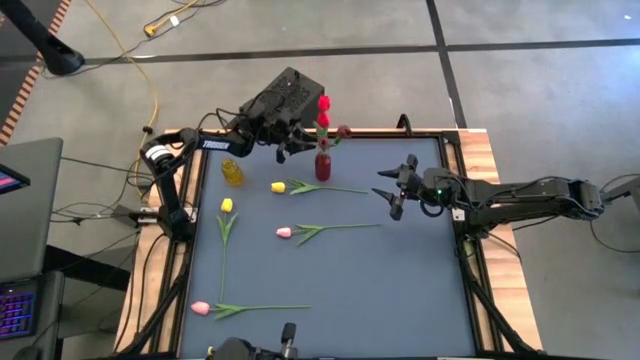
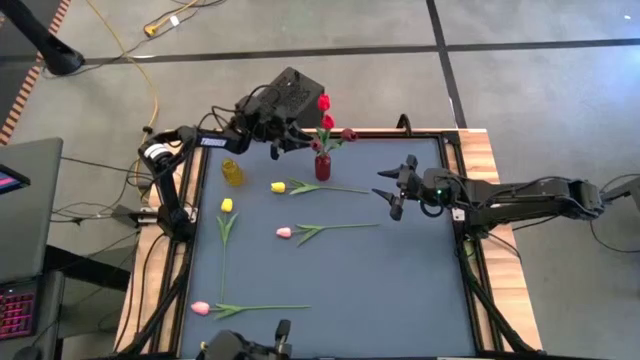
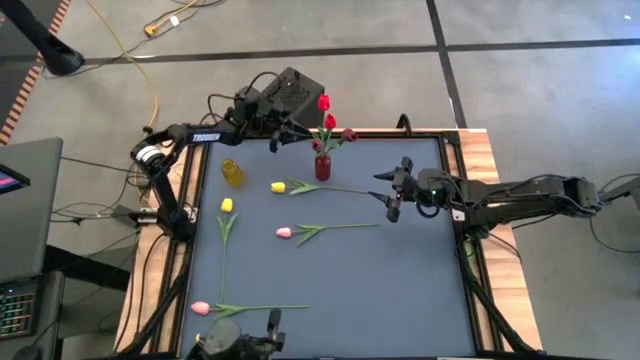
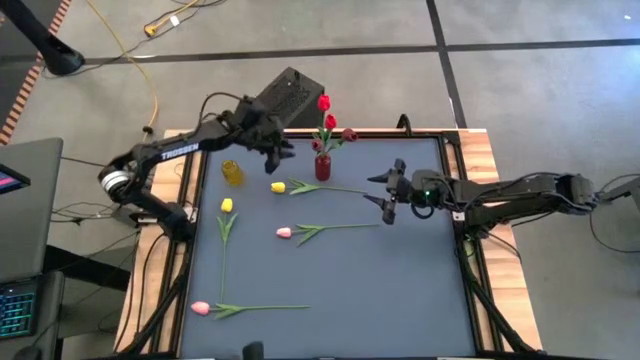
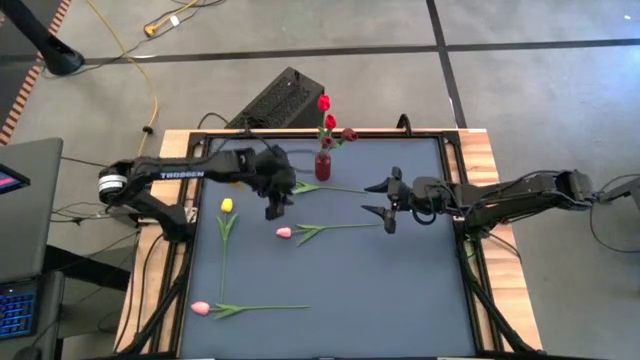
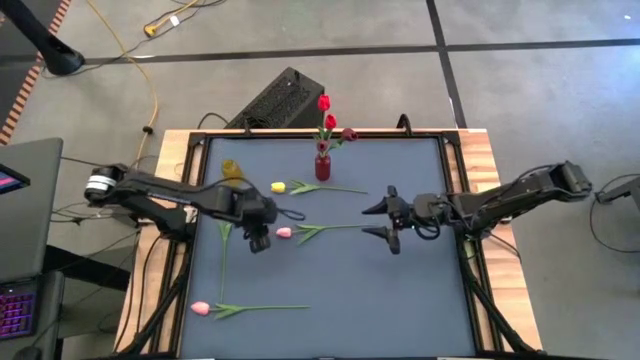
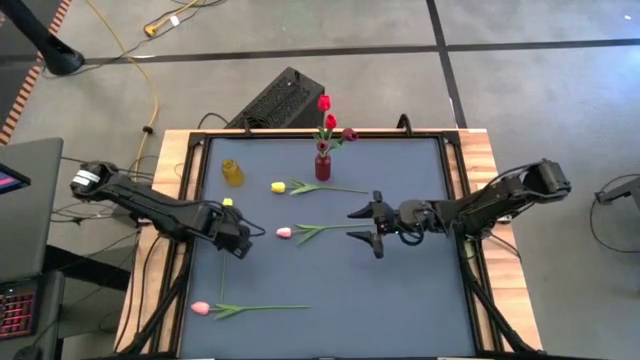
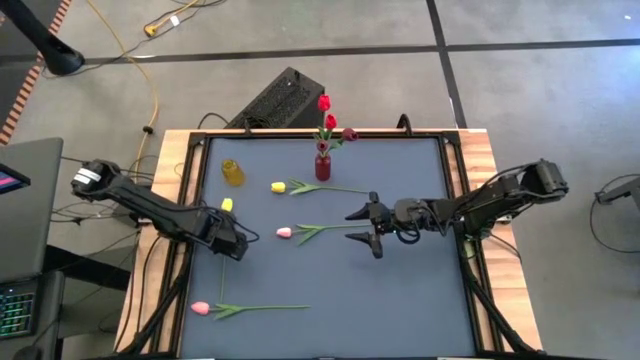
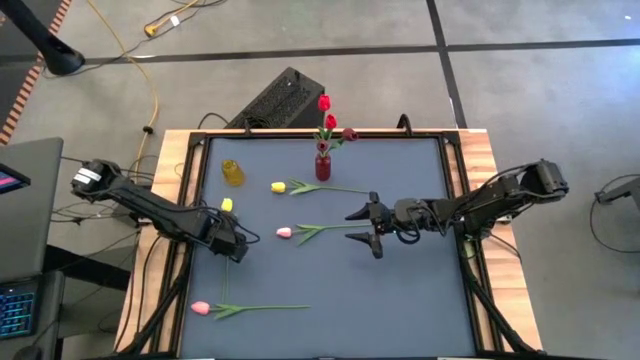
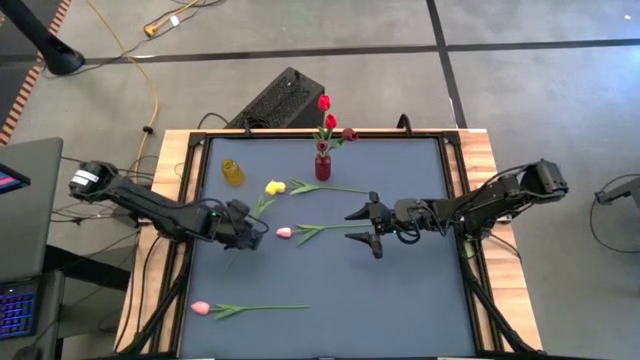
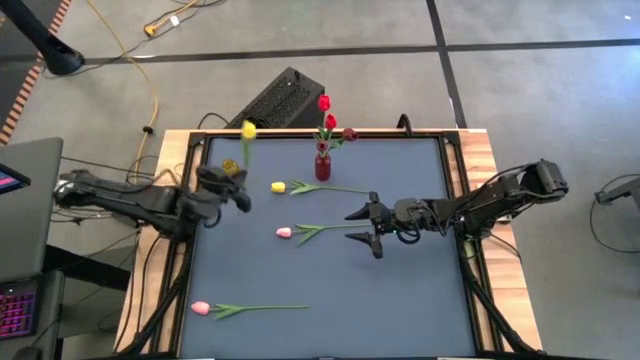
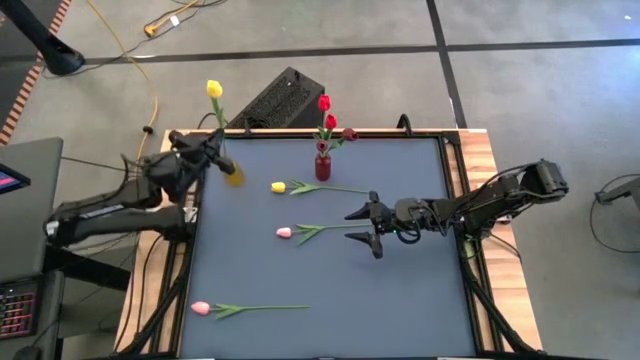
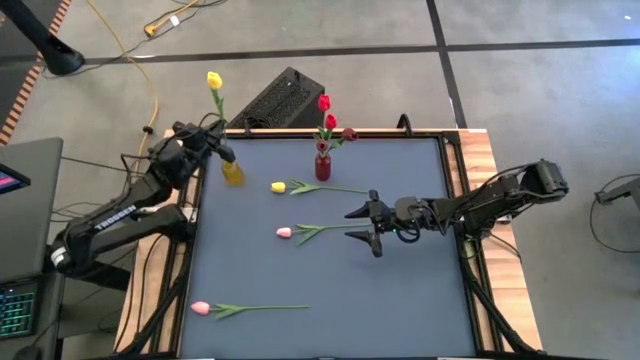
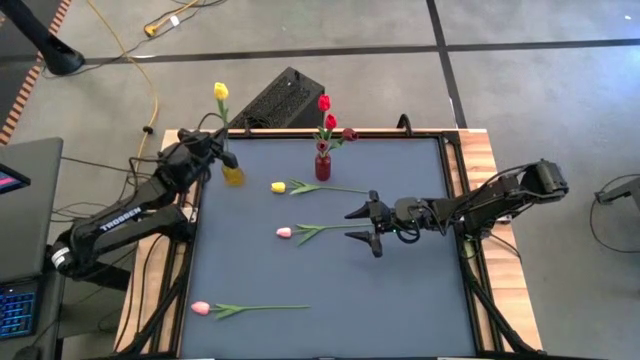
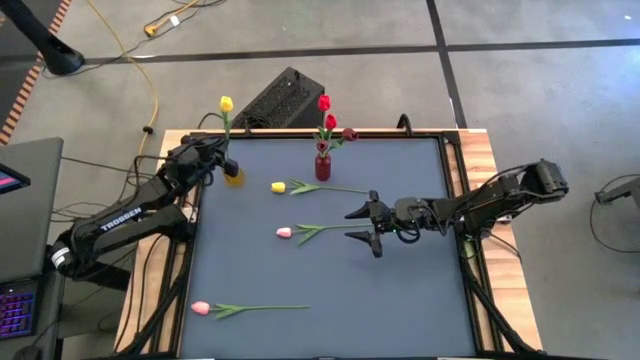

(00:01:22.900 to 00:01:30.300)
Task: Sort flowers into vase by color
Put the left yellow flower into the yellow flower vase

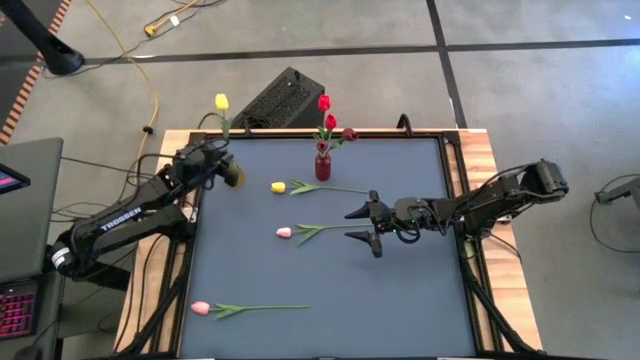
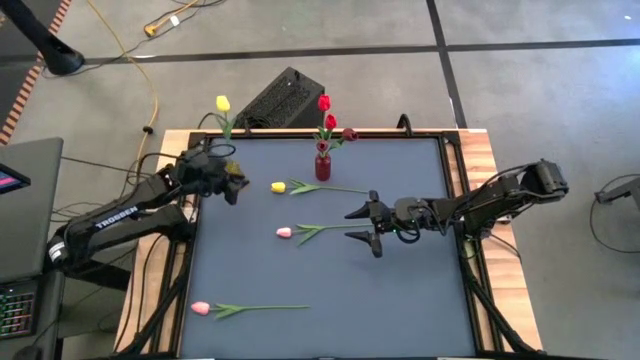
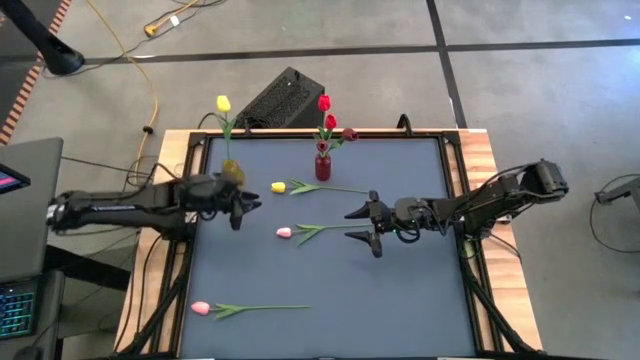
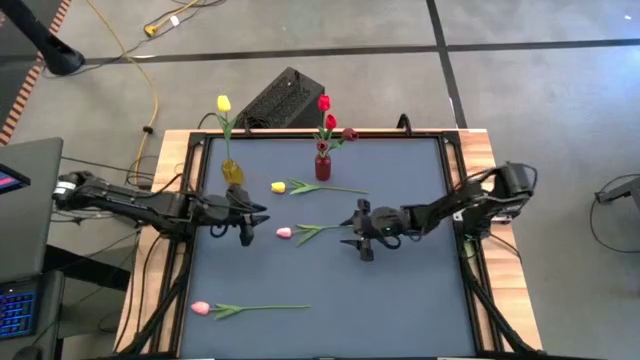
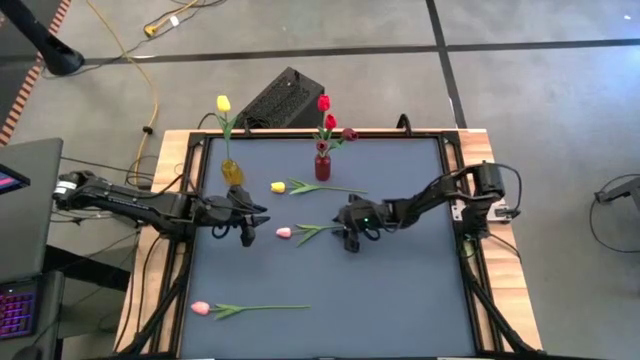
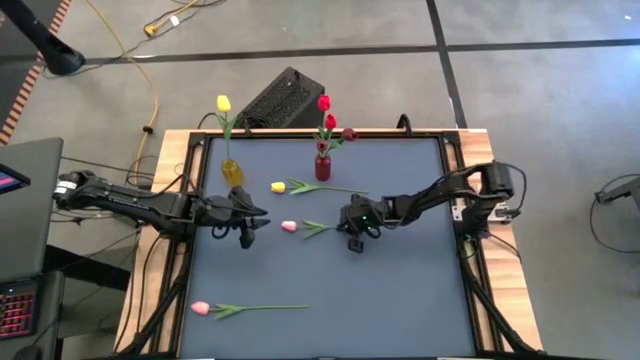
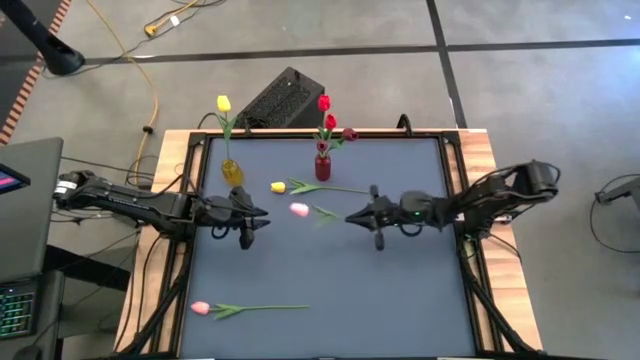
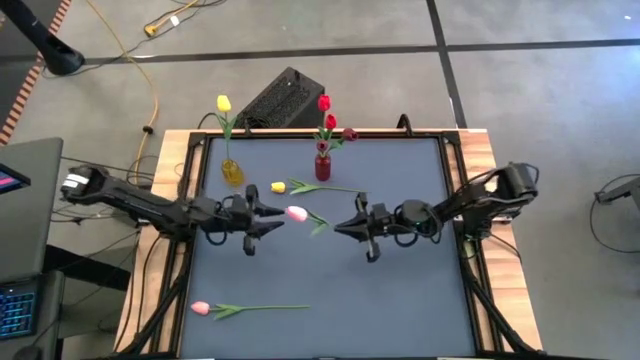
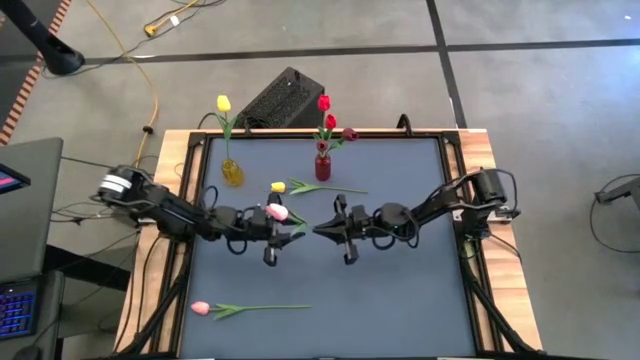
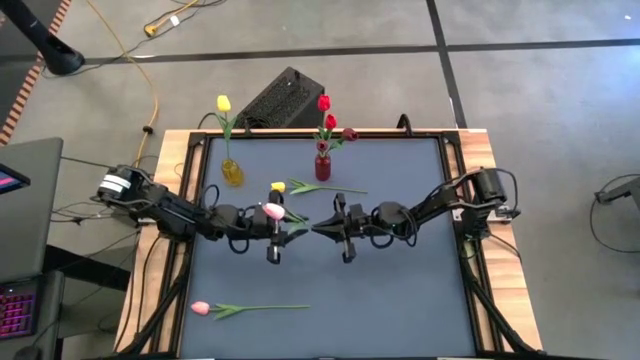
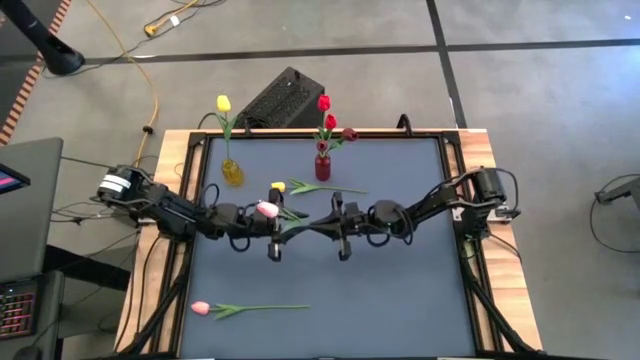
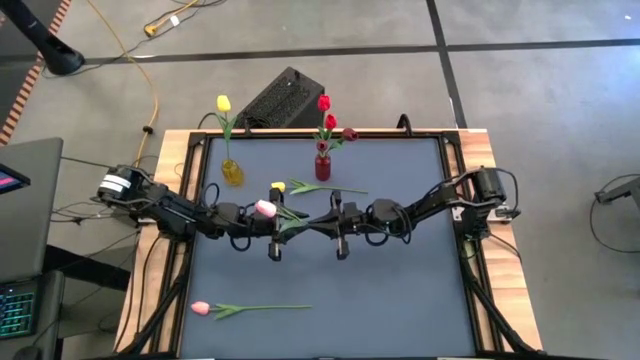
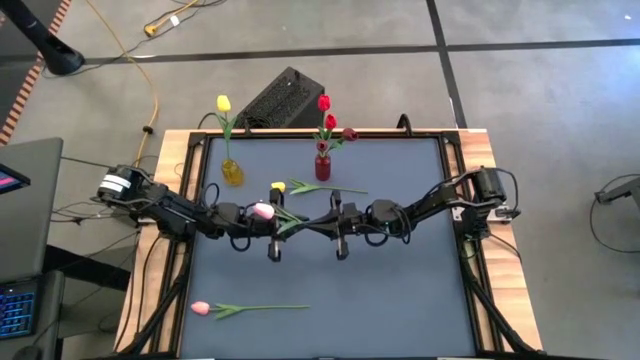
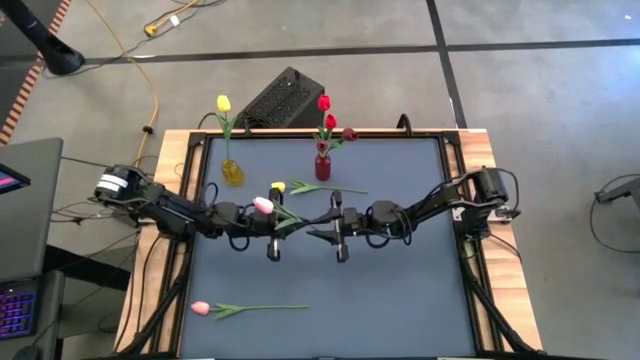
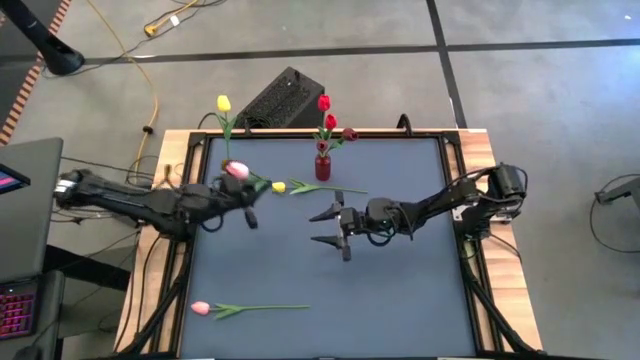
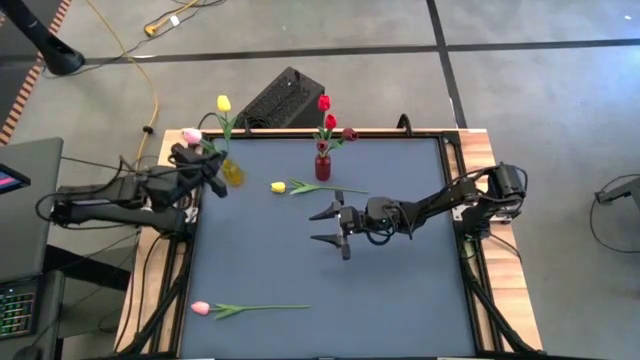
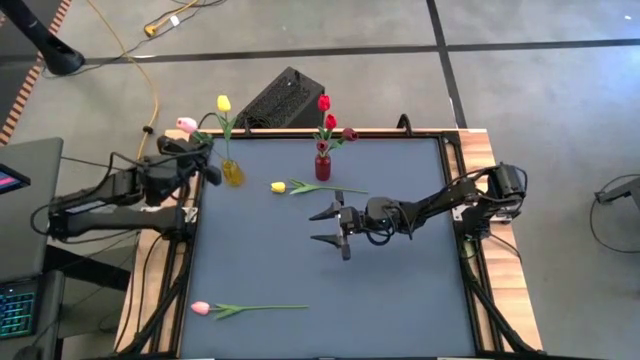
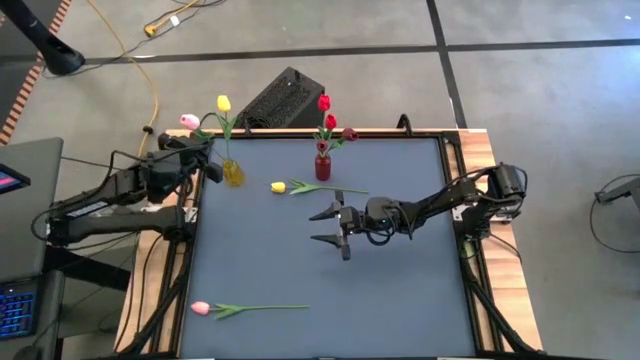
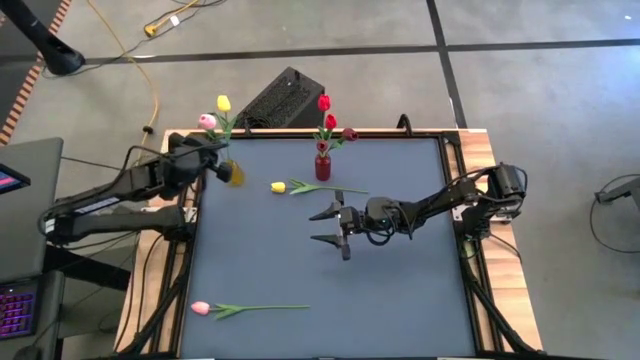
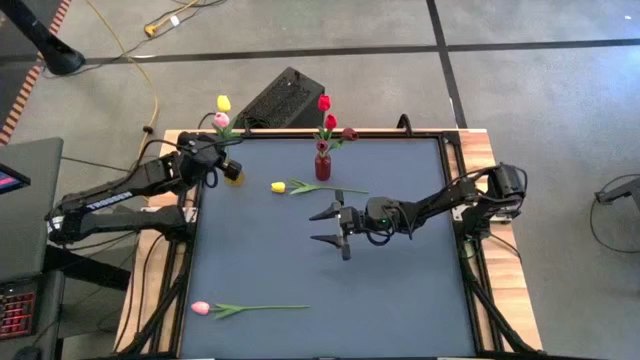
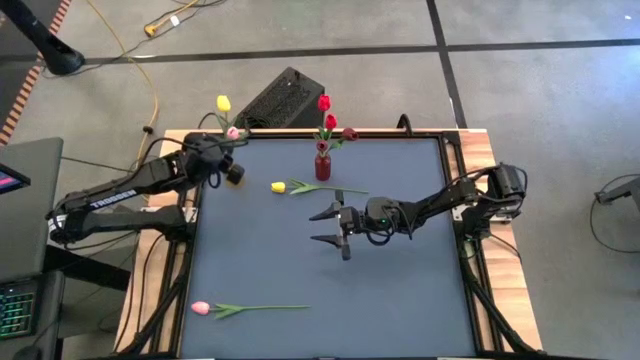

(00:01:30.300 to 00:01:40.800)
Put the top pink flower into the yellow flower vase

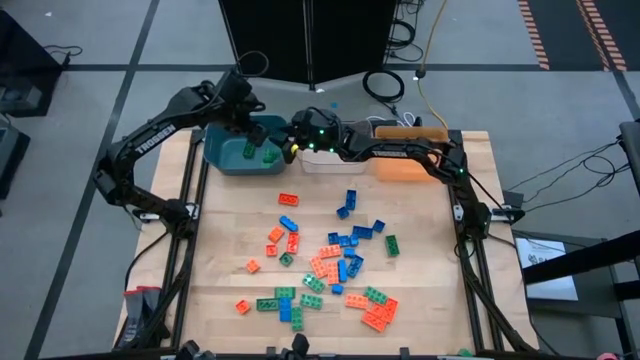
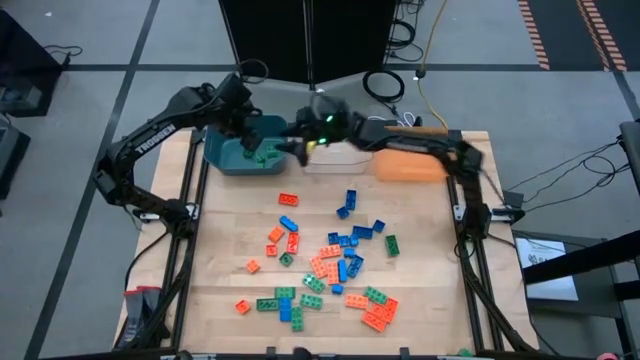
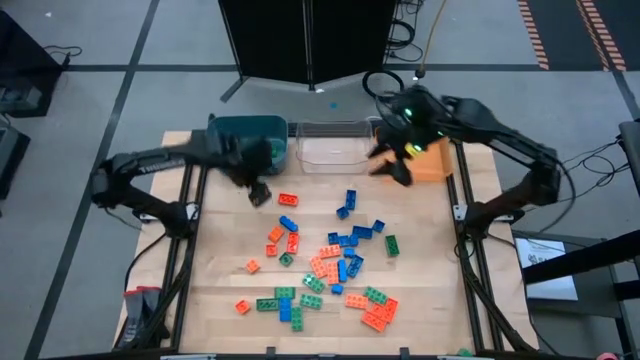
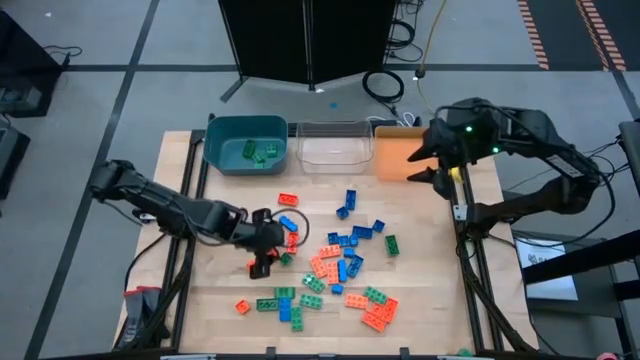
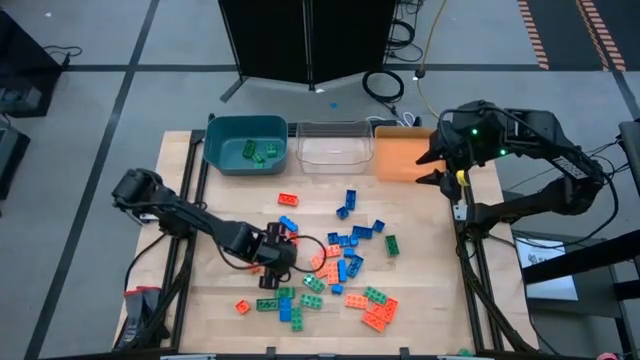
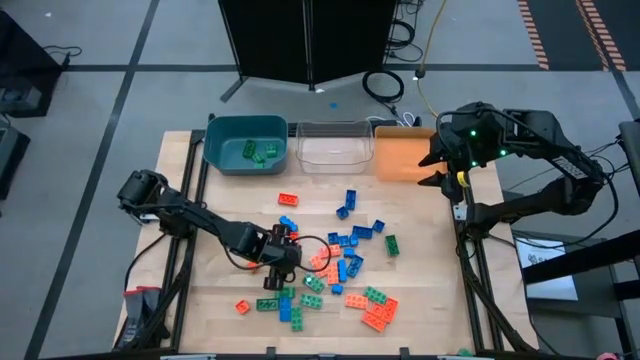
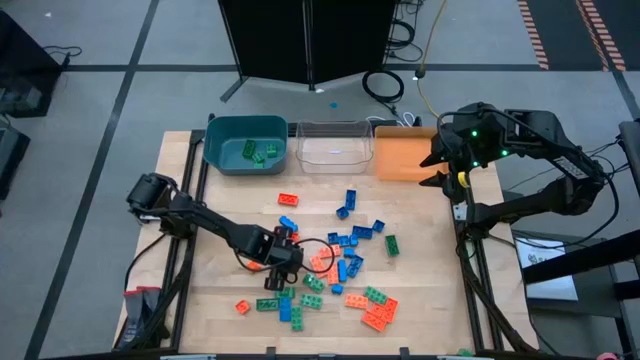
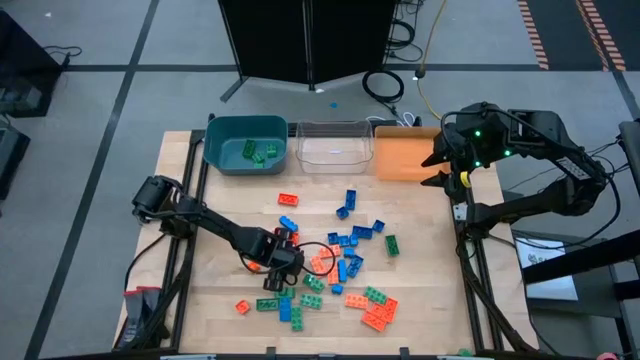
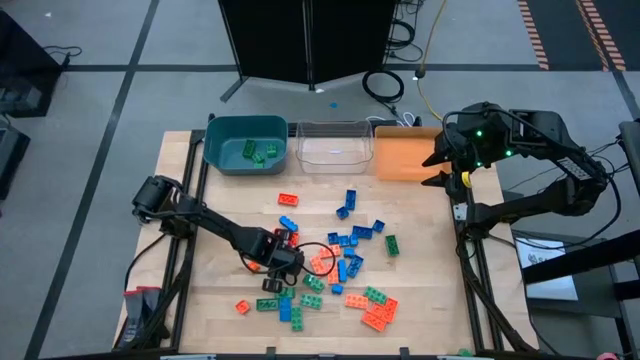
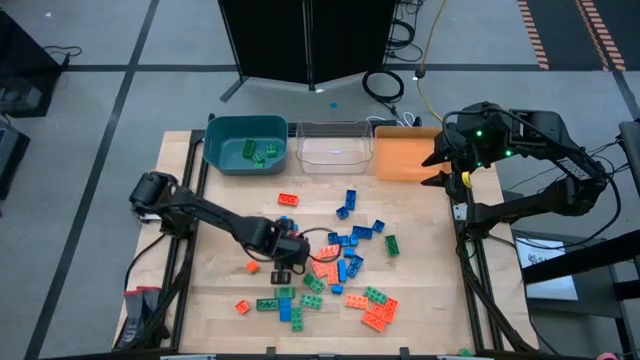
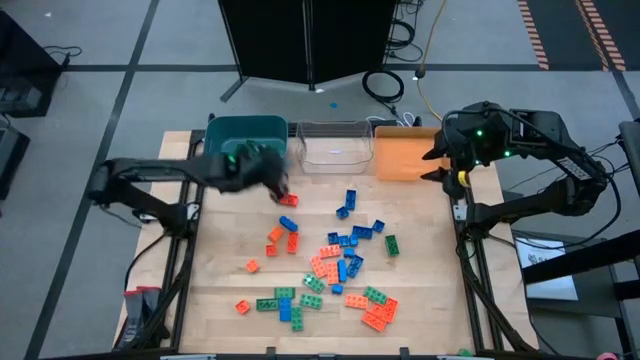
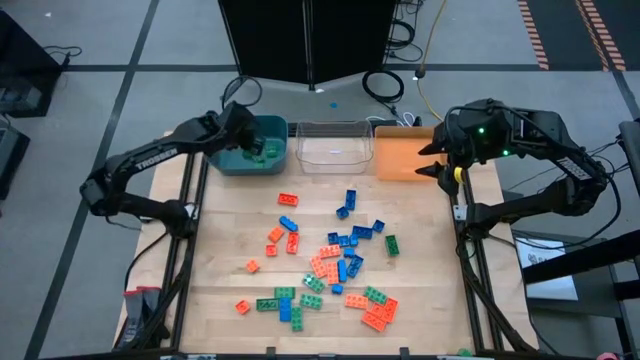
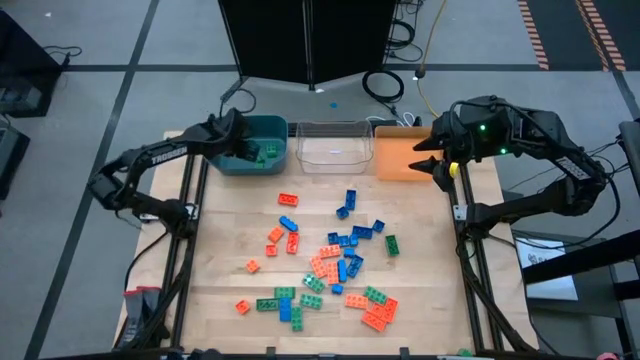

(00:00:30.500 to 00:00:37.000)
Task: Sort blocks
Put the green game piece into the blue bin
